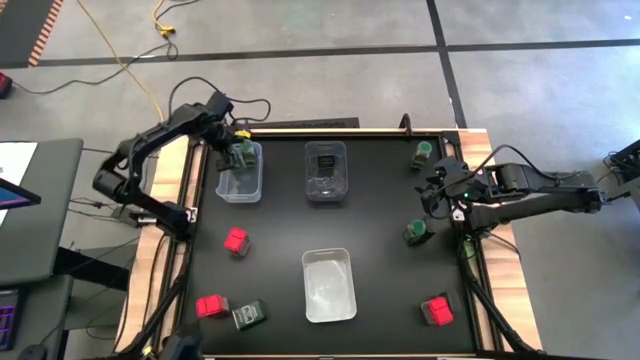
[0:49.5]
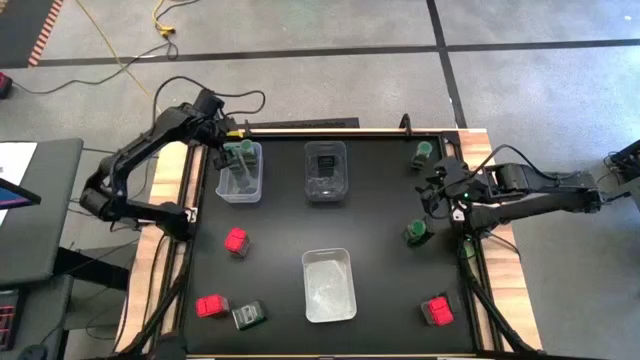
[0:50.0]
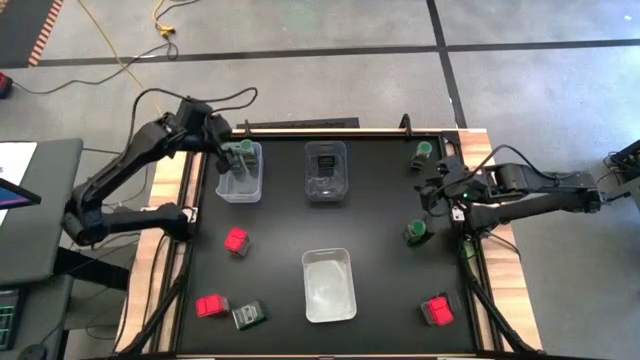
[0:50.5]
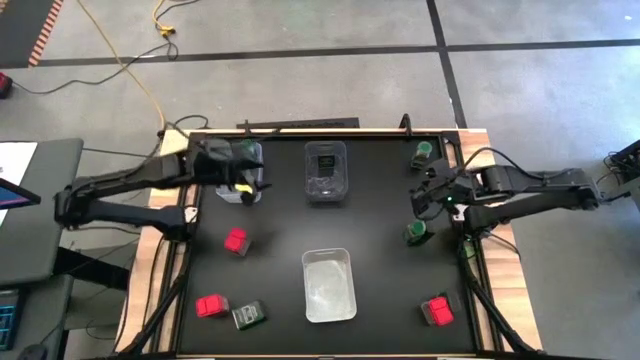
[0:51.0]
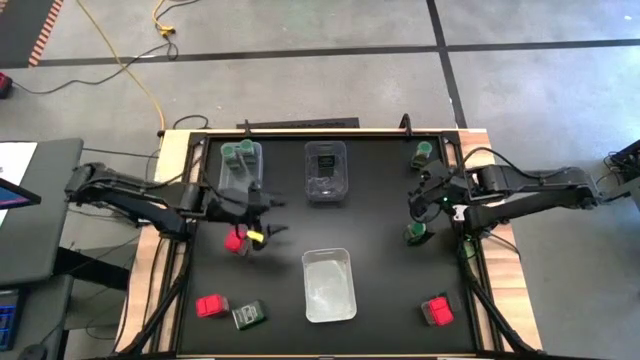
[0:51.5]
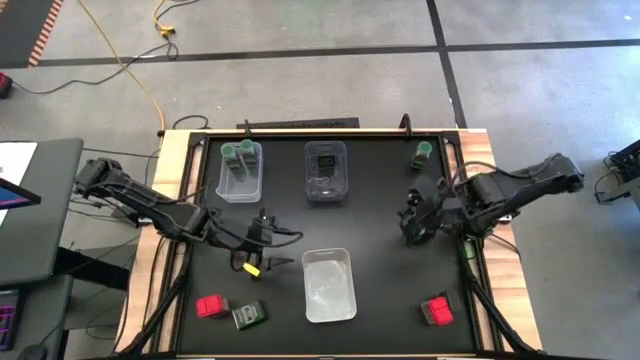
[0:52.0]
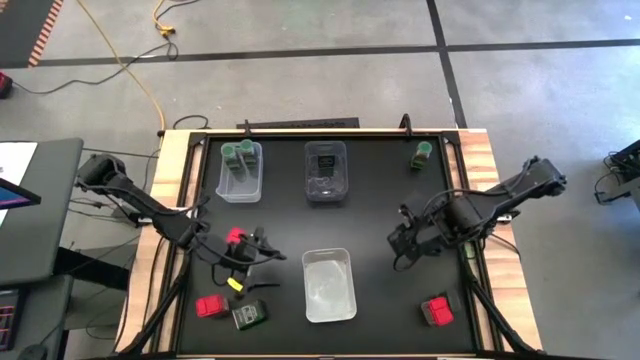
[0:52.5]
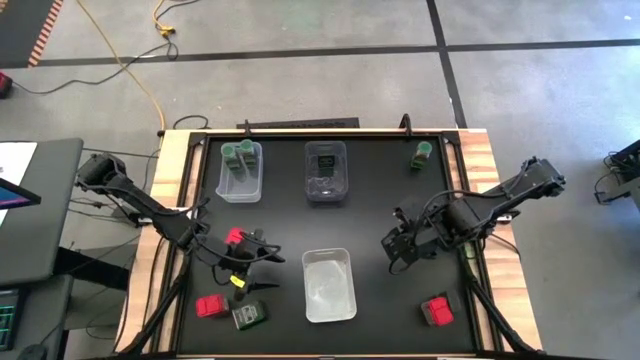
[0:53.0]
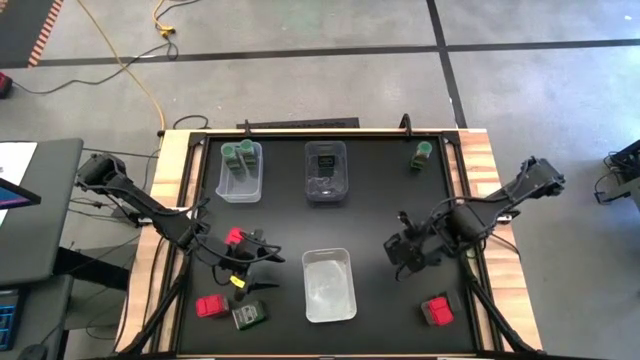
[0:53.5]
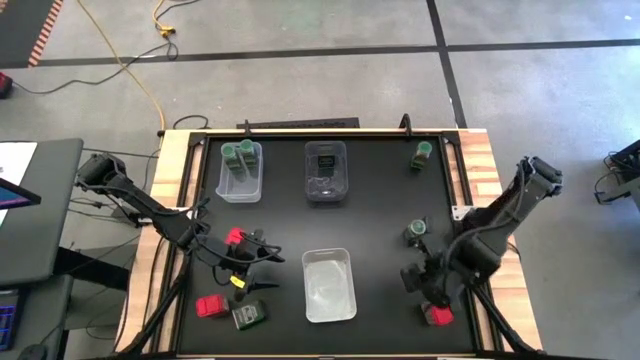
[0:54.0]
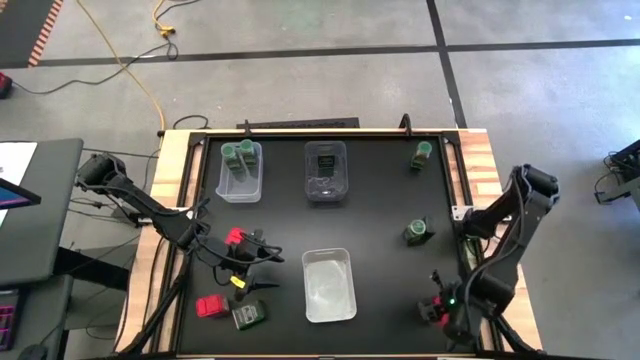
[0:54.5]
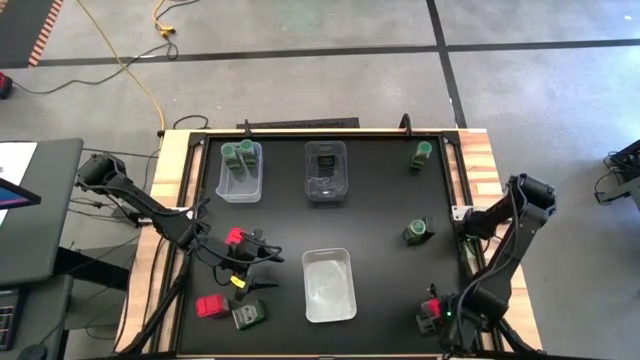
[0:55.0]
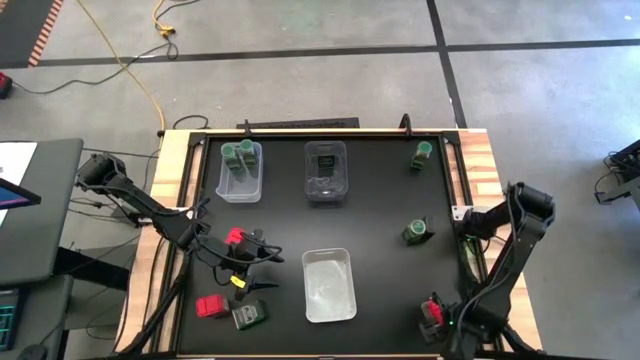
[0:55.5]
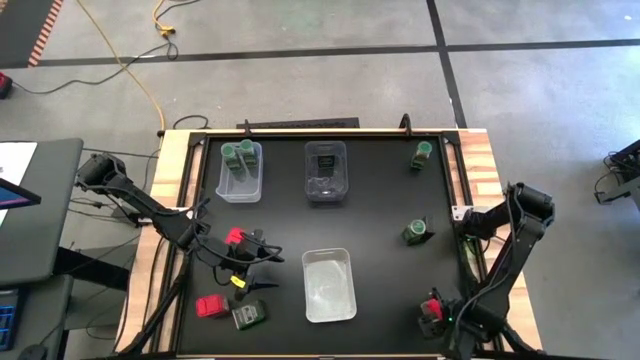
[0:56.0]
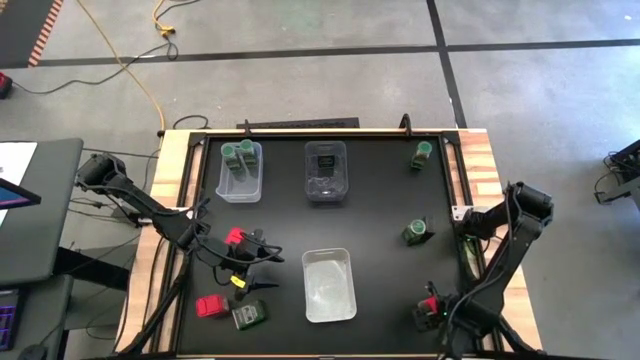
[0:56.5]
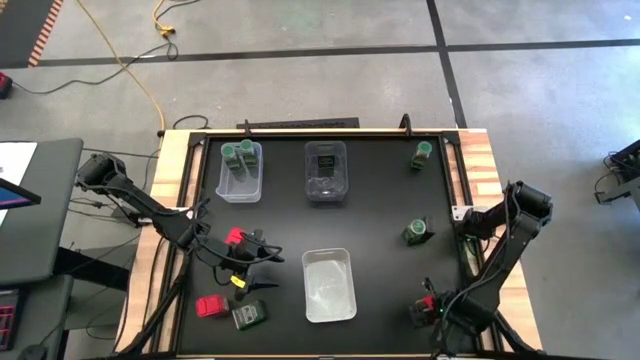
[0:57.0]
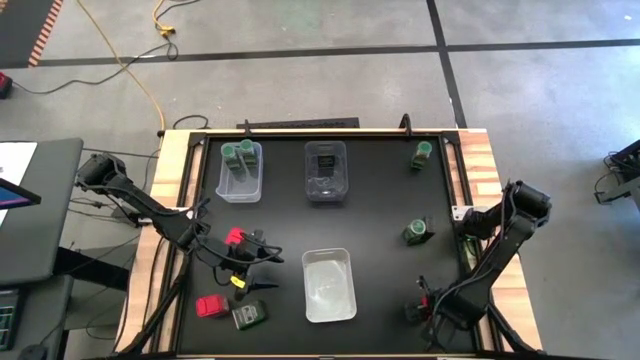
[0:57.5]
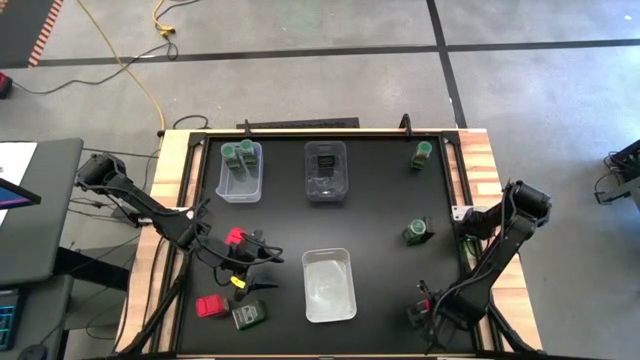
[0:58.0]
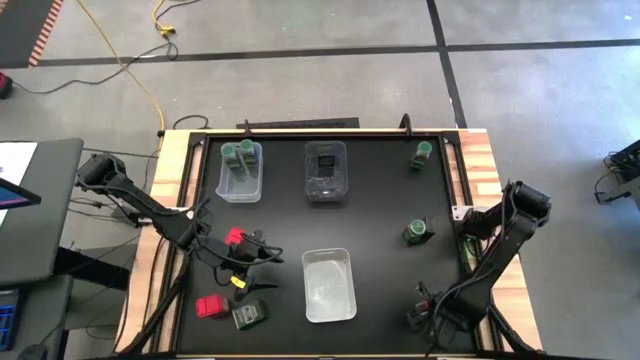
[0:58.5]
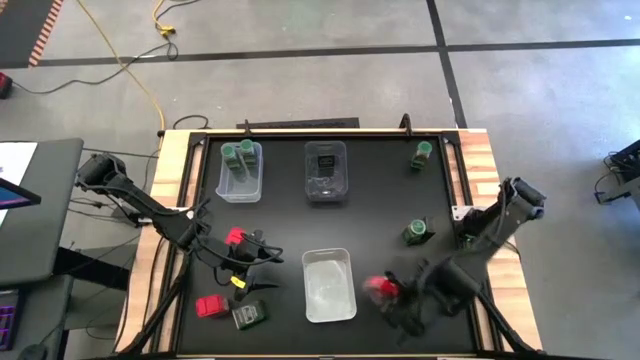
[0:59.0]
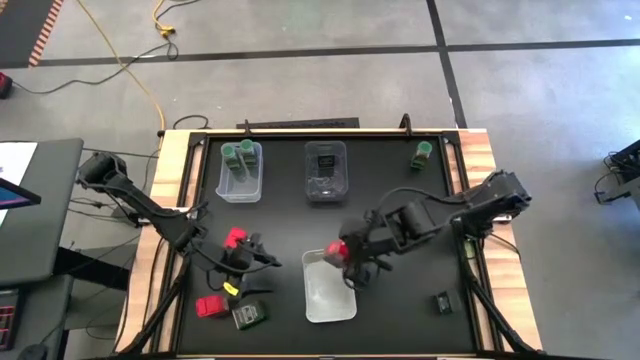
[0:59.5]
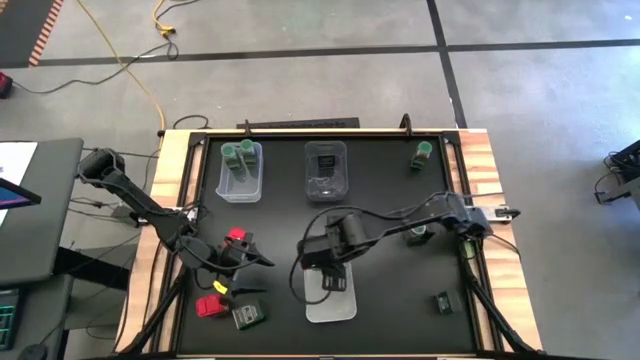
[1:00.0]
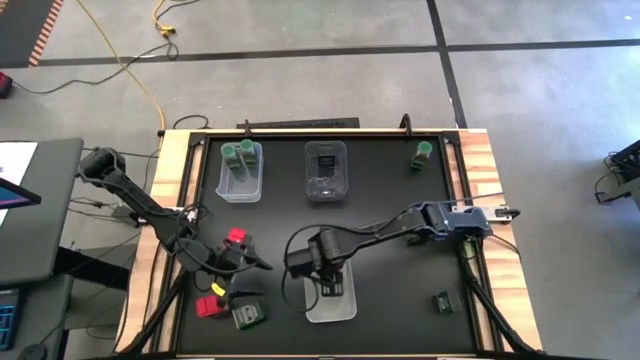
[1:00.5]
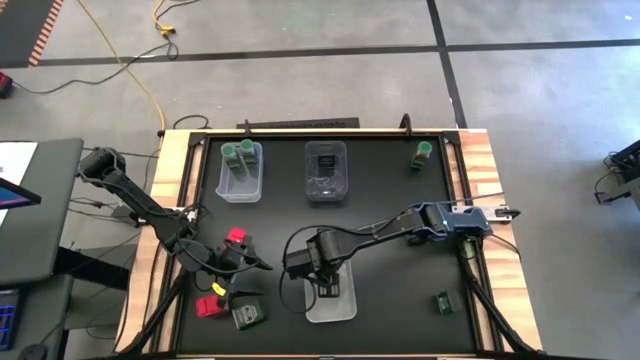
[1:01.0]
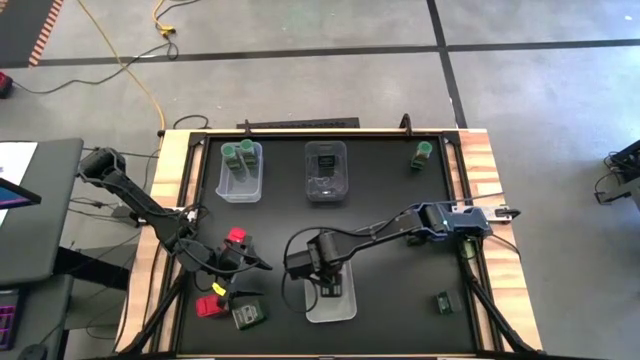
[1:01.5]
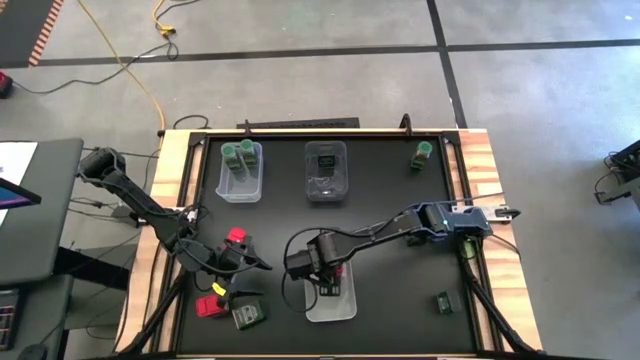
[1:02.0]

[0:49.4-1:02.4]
Task: Sort spices by type
Put the bottom right red seasoning can into the white bin

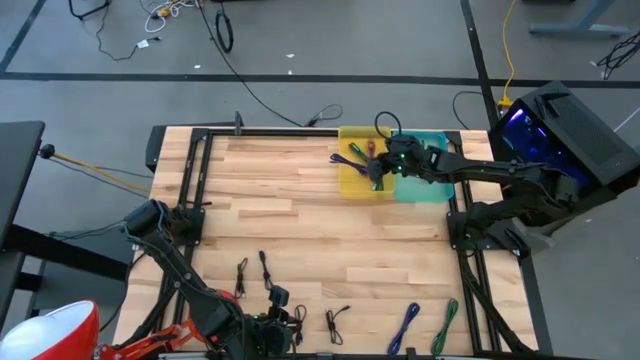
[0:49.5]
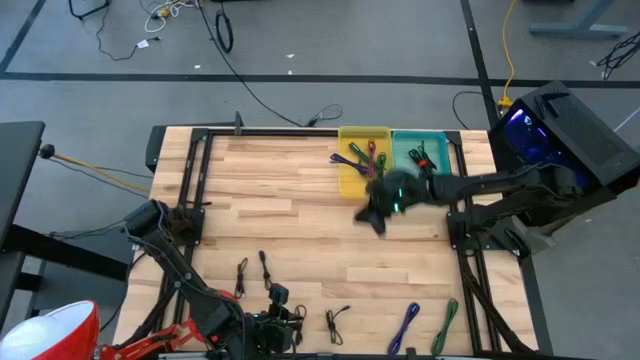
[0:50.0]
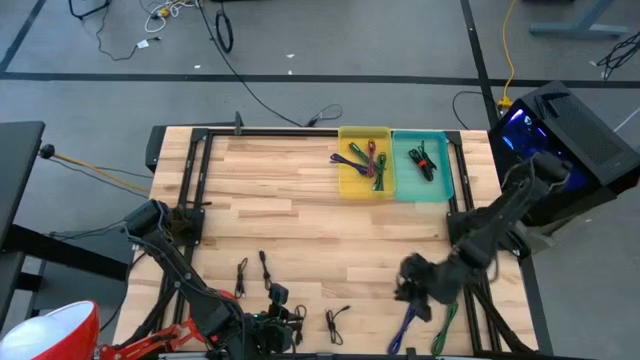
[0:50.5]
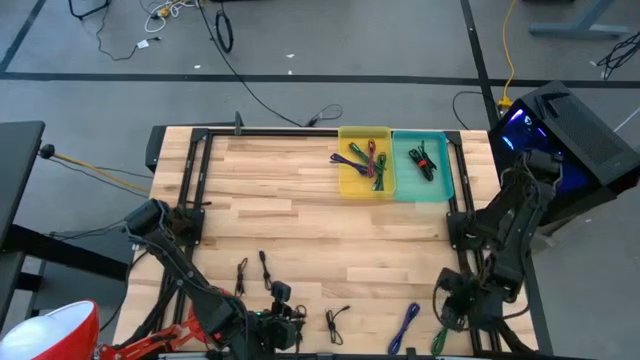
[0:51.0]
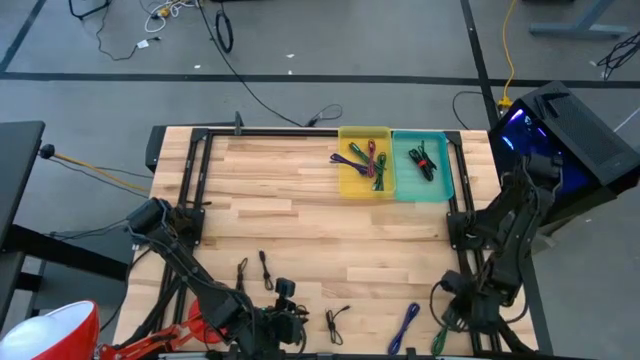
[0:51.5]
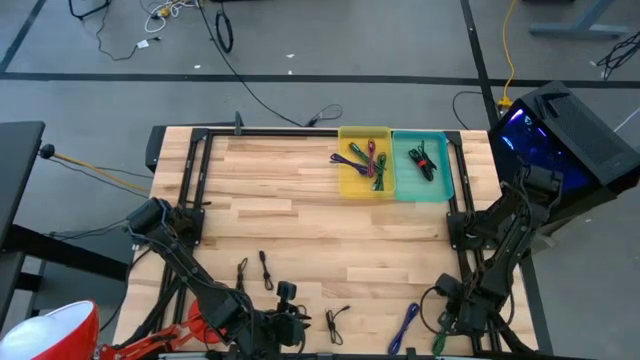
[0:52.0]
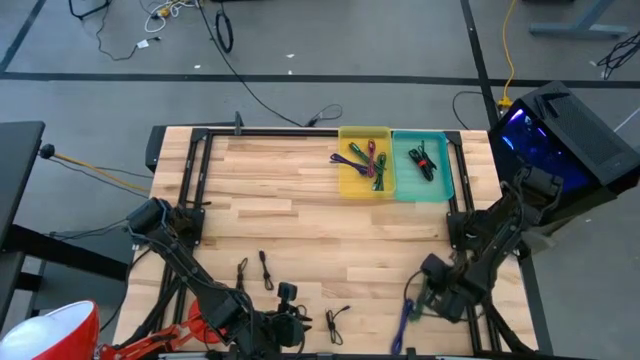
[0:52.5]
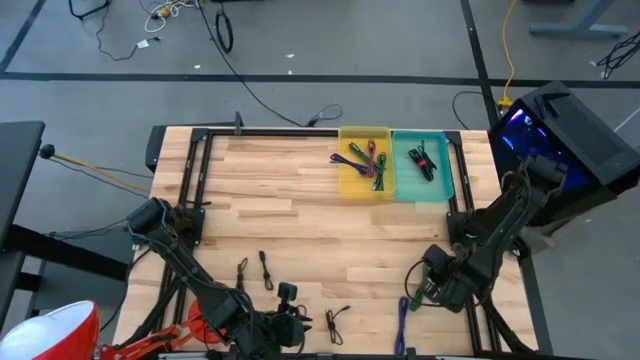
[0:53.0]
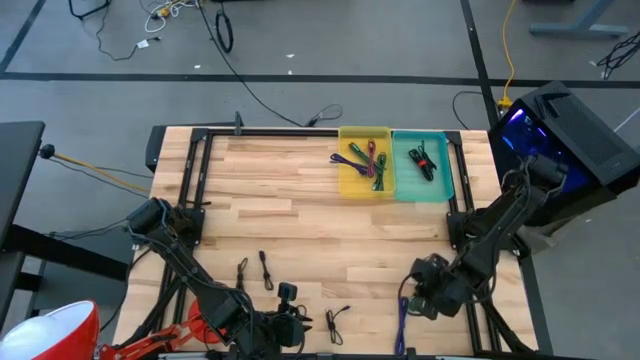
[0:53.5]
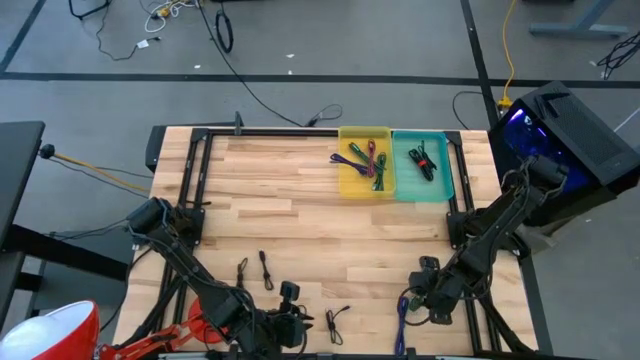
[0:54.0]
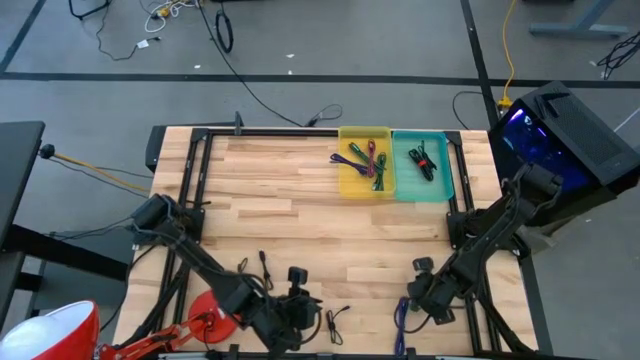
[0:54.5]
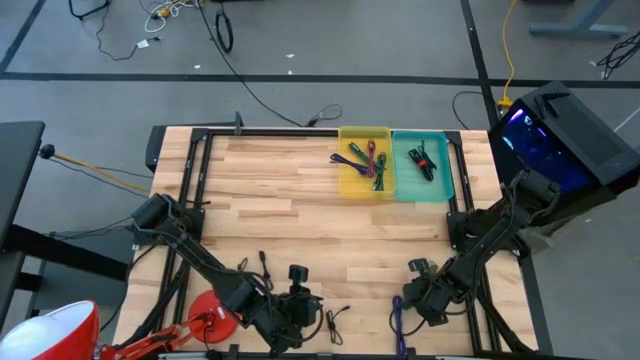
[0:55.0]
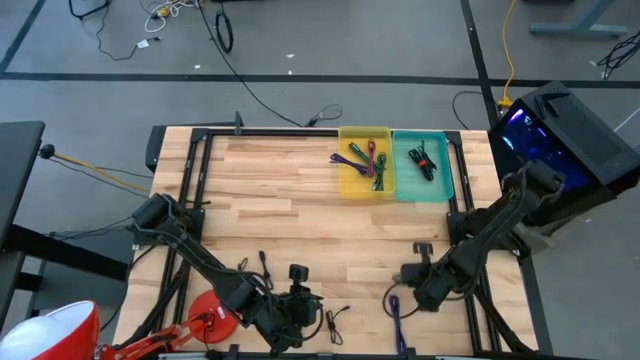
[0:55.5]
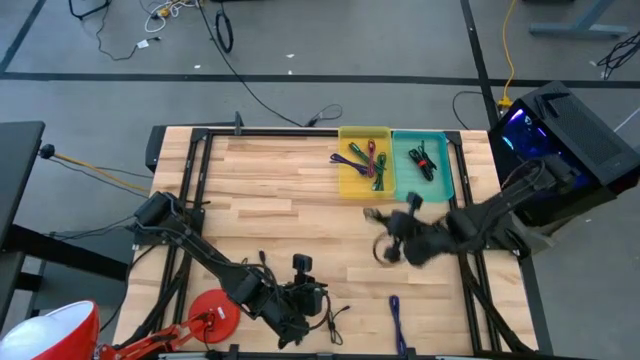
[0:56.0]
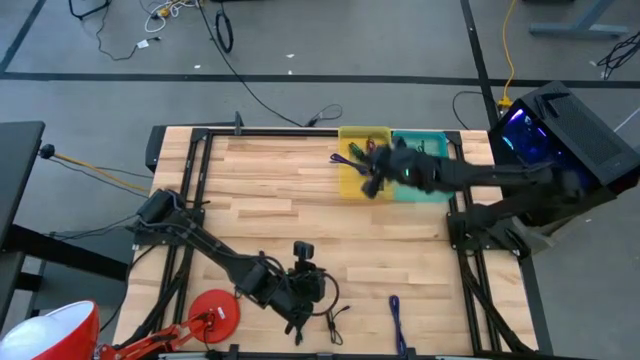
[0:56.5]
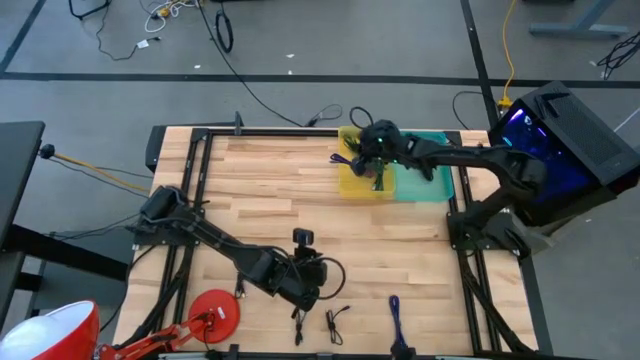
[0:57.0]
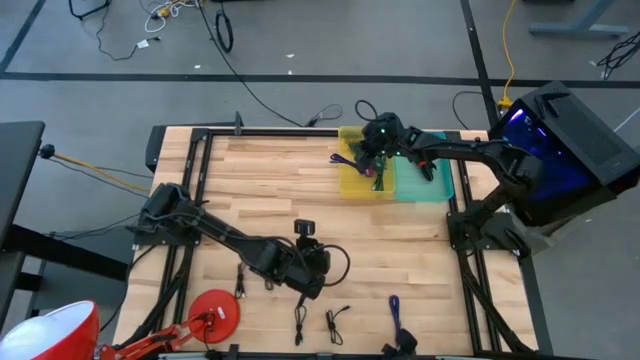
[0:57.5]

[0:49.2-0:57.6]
Task: Pick & Place USB Port
Put the green black charger cable into the yellow bin
